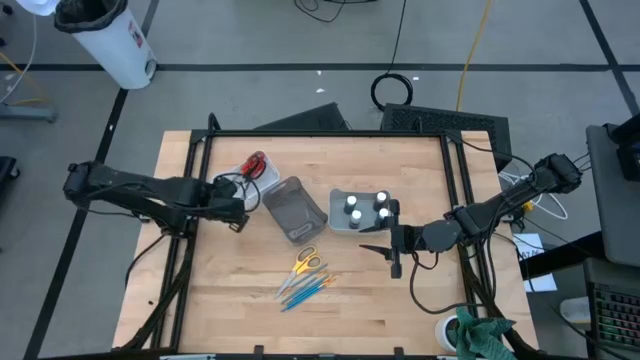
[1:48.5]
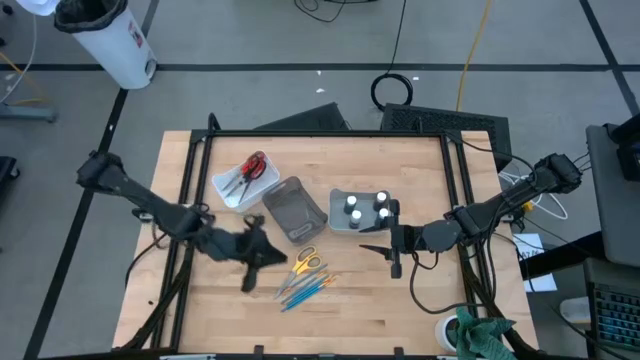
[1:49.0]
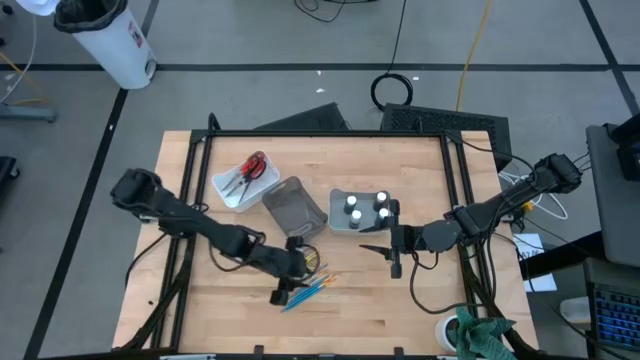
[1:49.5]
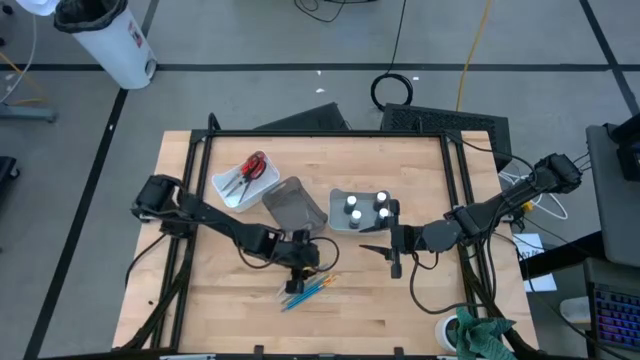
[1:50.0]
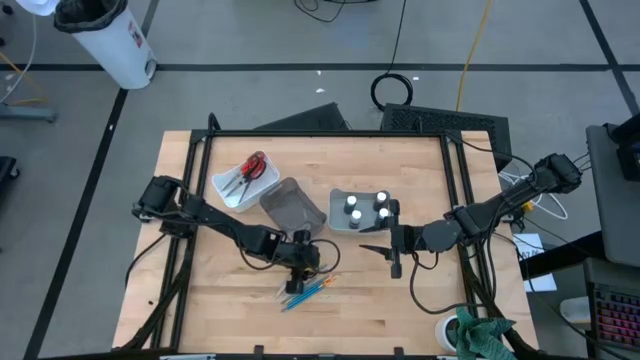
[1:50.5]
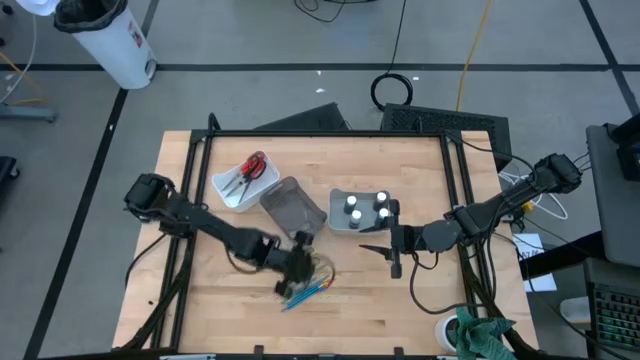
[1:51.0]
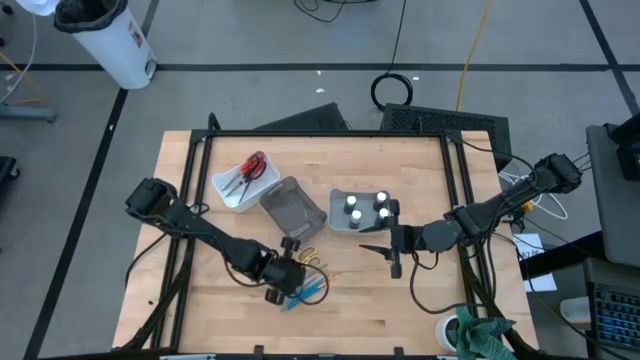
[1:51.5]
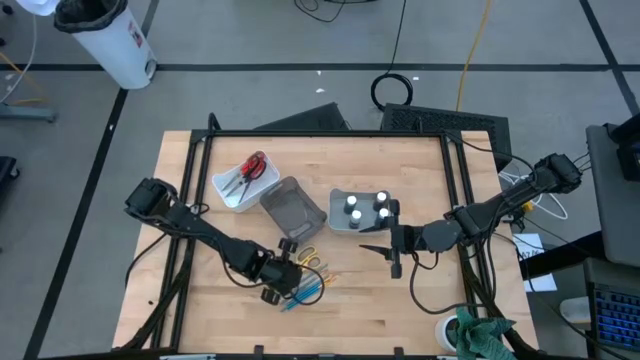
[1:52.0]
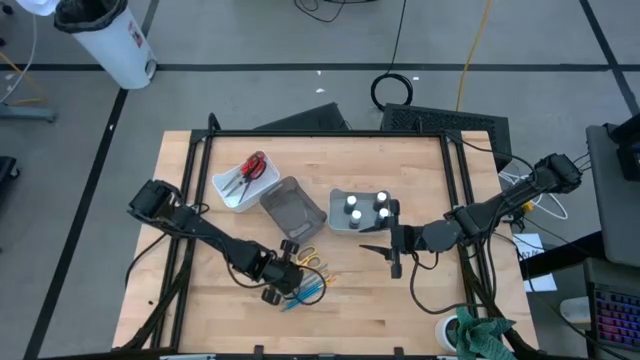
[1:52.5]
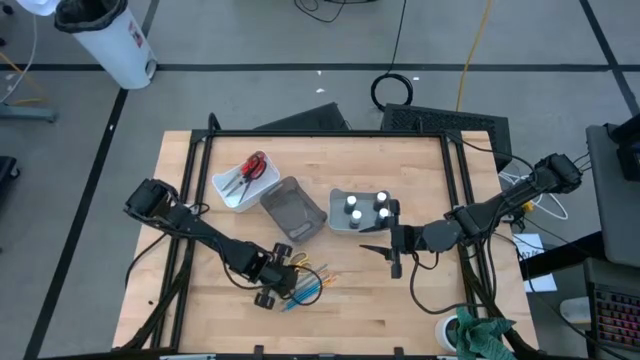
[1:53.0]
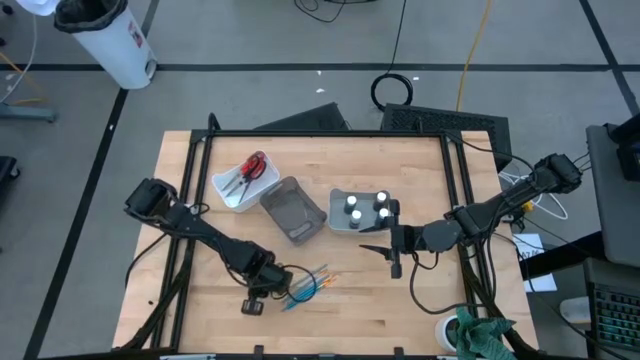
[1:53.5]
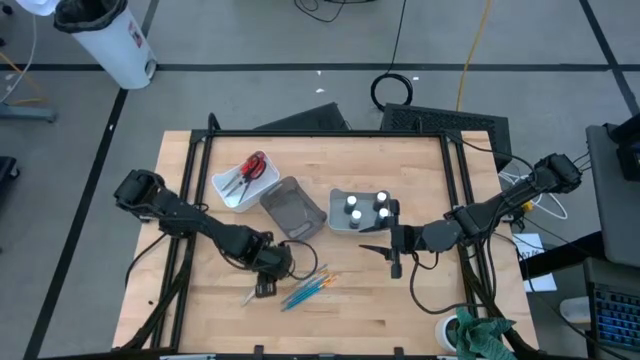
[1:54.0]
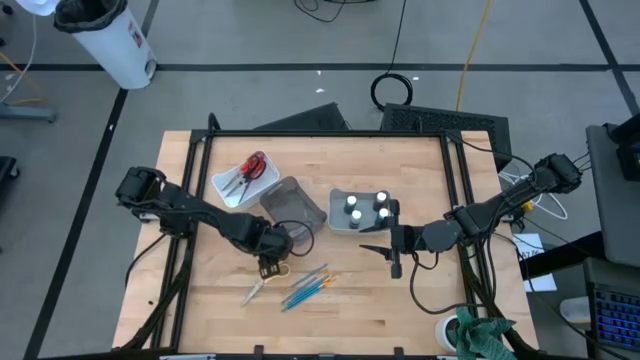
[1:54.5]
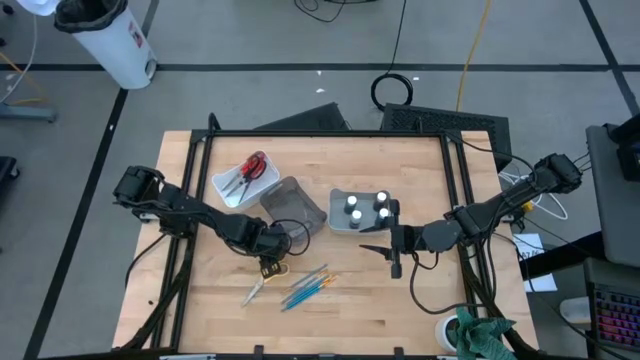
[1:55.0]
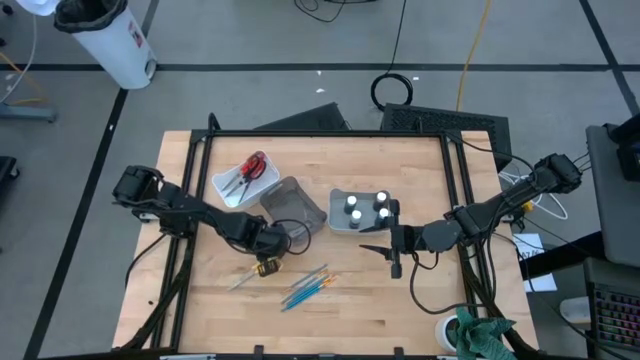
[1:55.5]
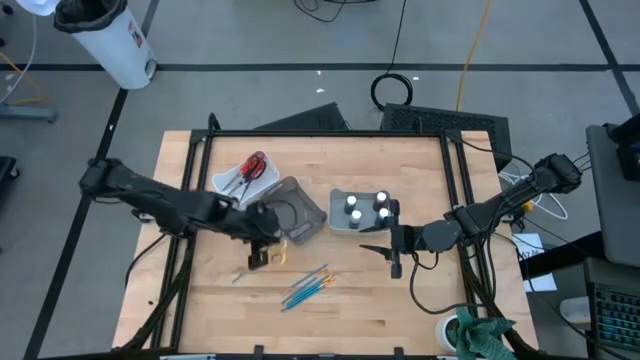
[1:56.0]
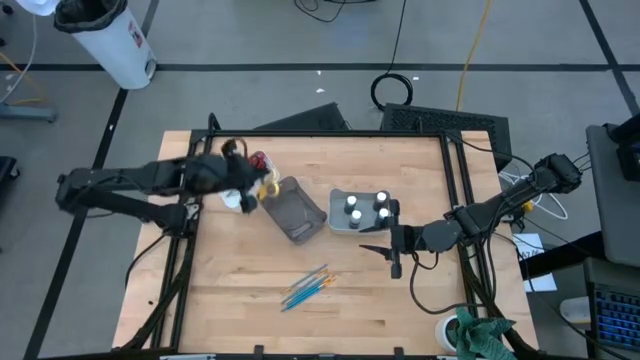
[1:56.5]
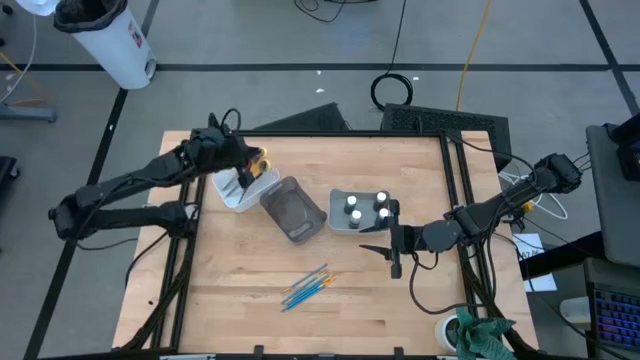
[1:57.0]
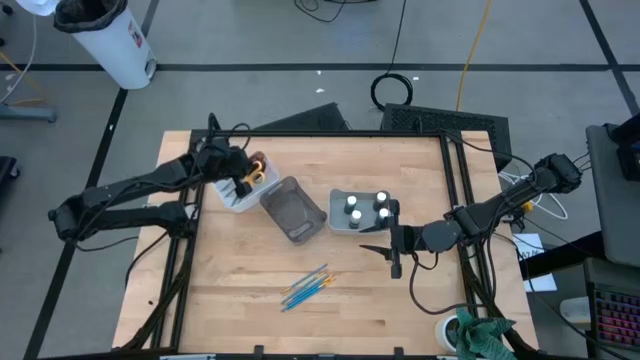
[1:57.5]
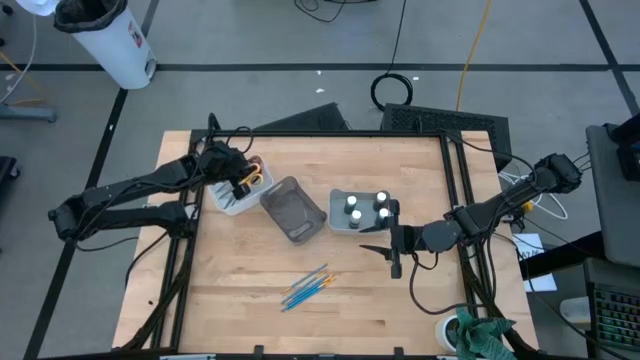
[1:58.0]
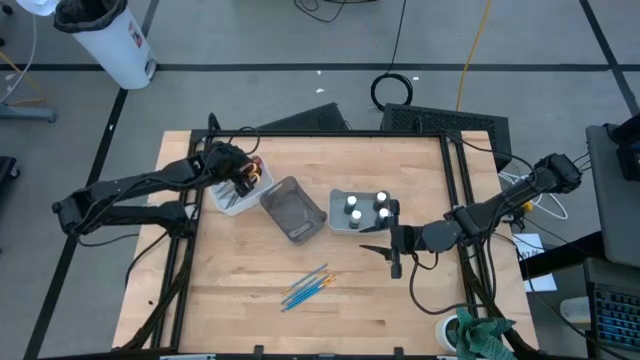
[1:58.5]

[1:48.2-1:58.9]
Task: Pick & Place Paint Supplies
Put the yellow scissors into the white bin

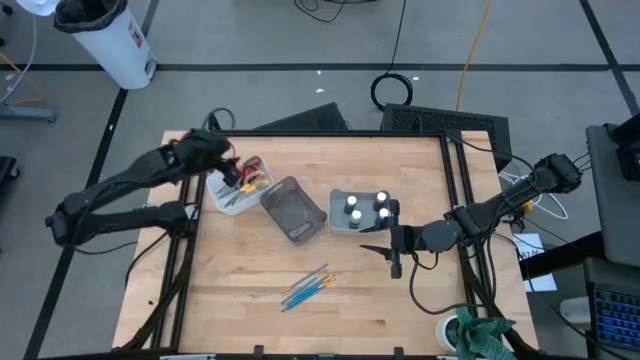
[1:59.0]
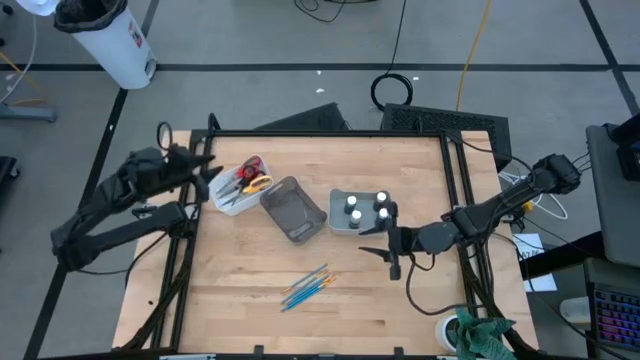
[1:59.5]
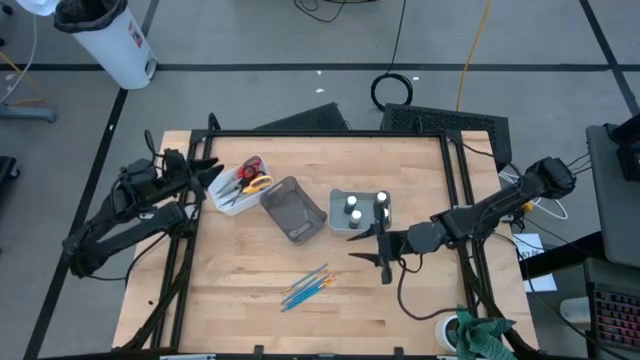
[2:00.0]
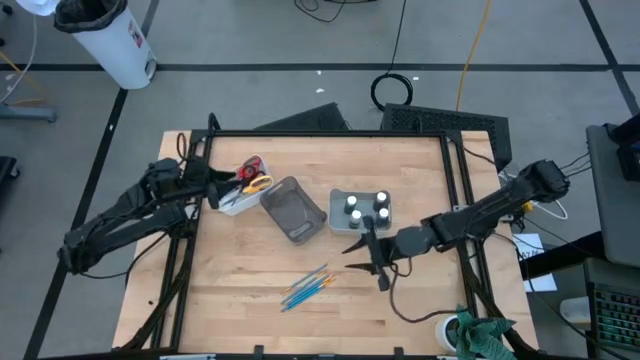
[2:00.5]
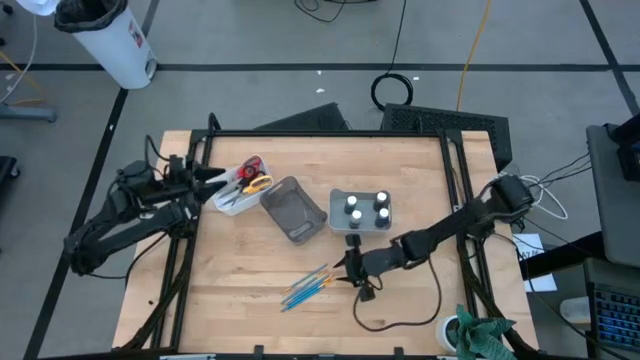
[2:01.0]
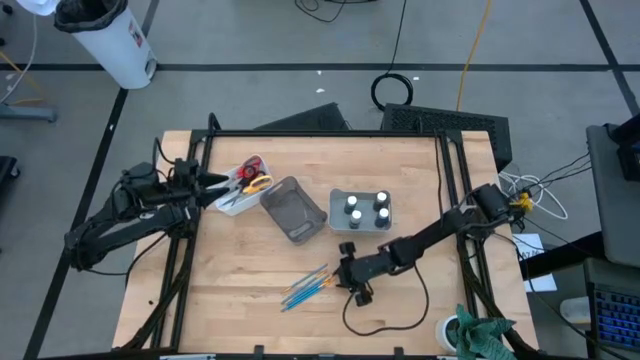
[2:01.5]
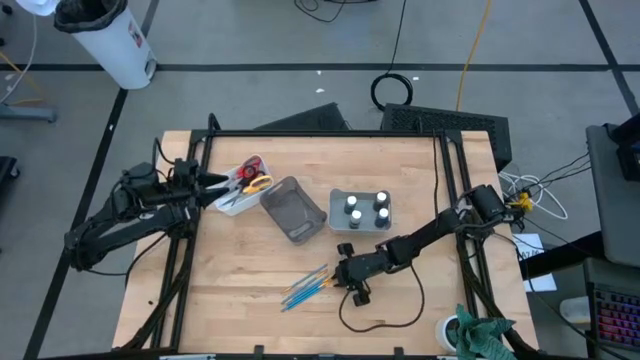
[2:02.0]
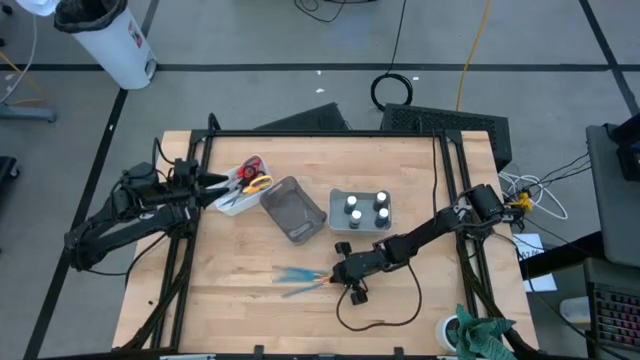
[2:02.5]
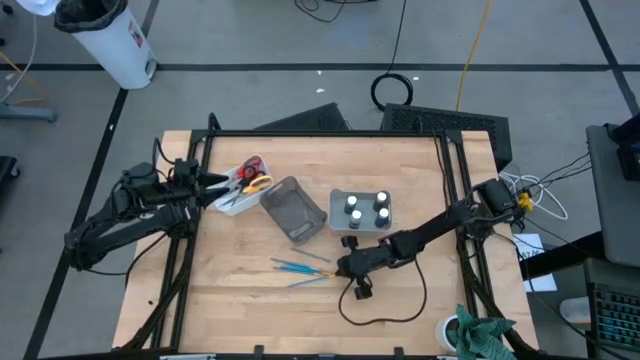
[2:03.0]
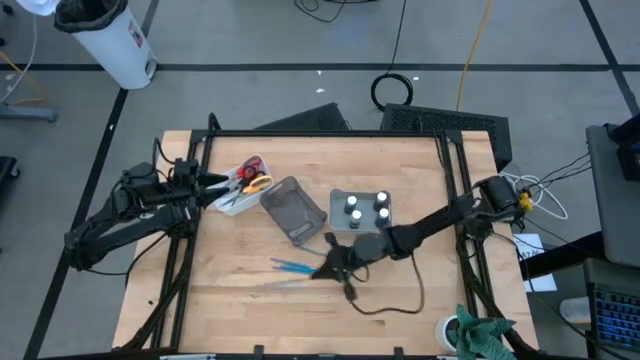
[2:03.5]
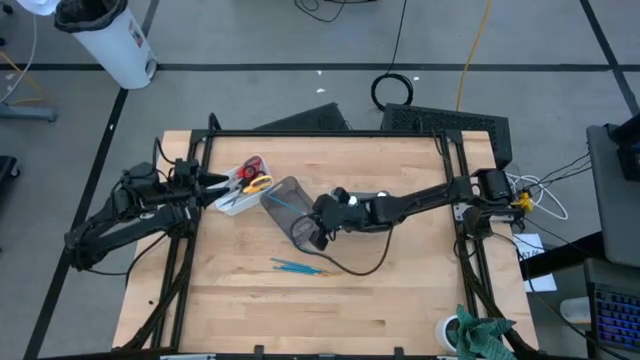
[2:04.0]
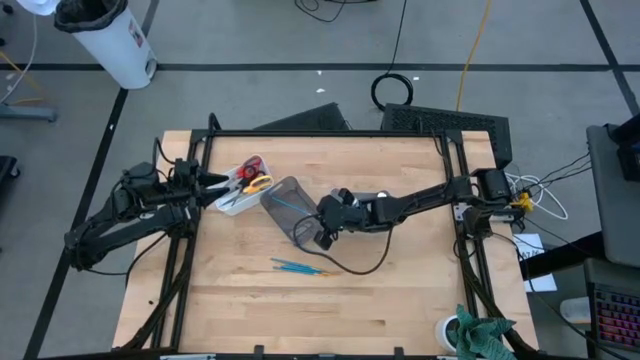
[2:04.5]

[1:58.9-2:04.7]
Put the blue paintbrush into the black bin

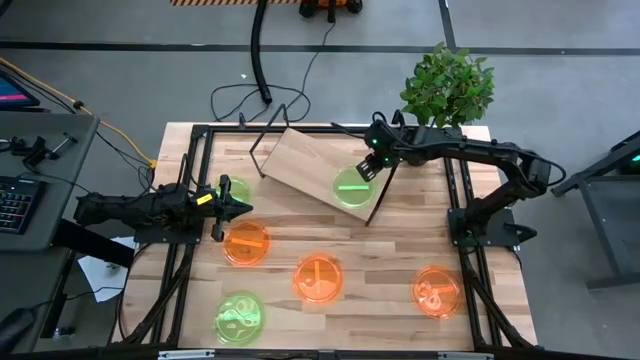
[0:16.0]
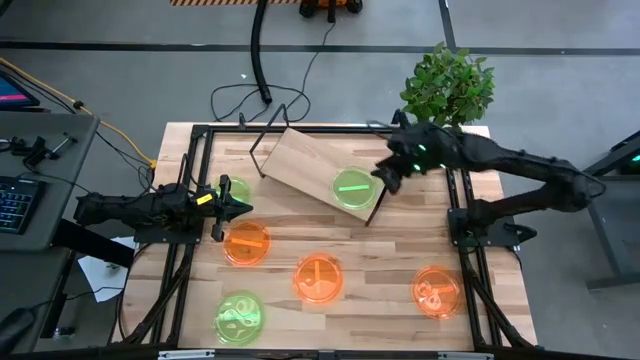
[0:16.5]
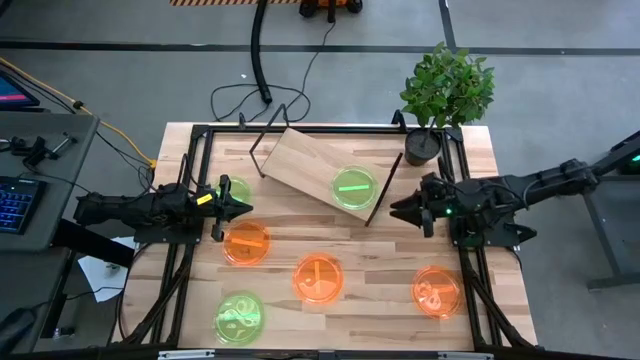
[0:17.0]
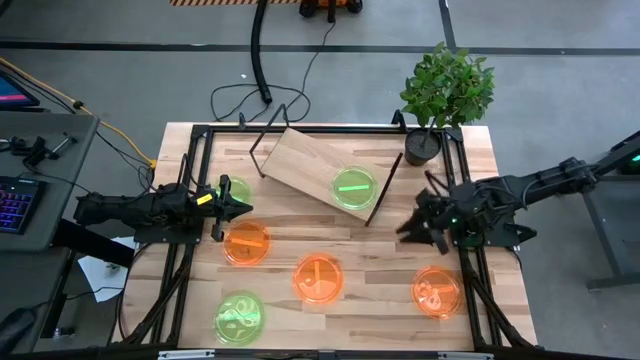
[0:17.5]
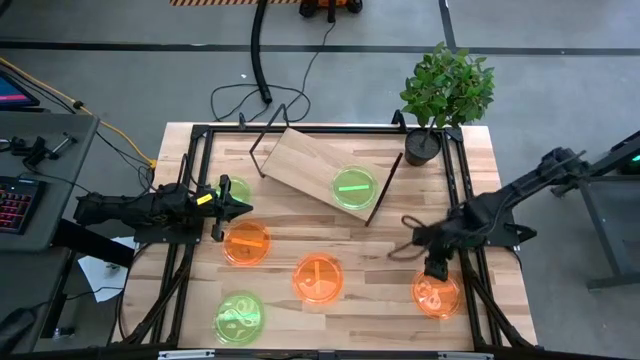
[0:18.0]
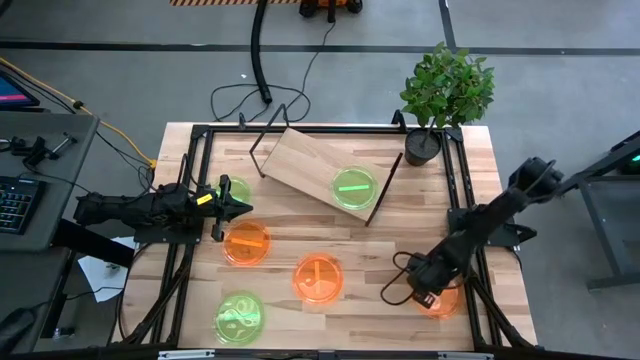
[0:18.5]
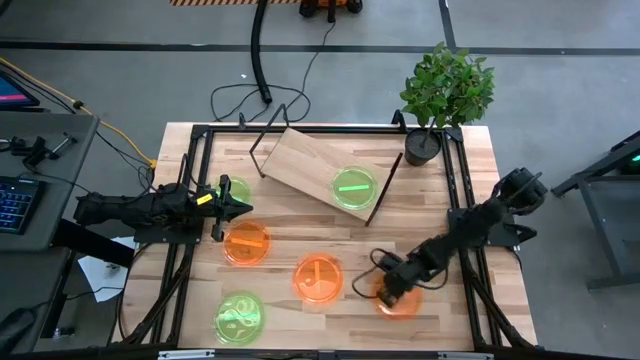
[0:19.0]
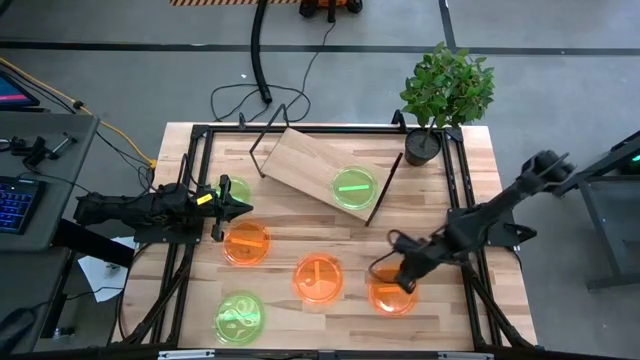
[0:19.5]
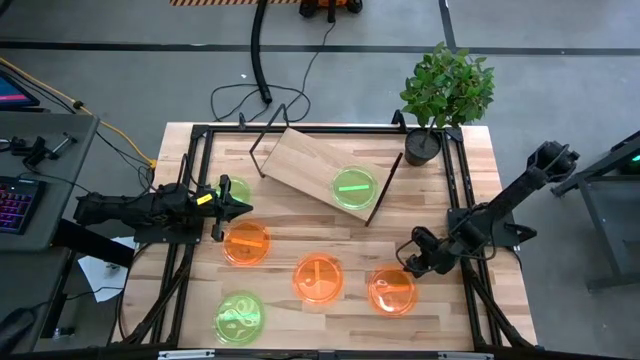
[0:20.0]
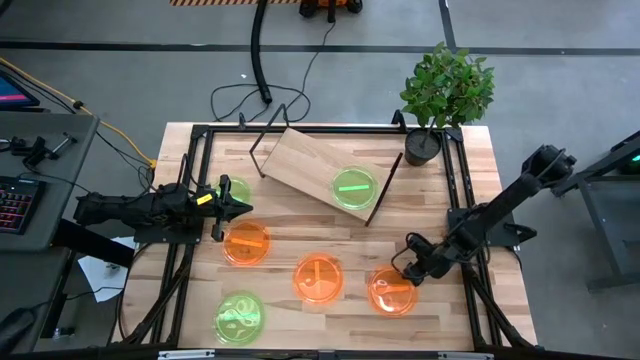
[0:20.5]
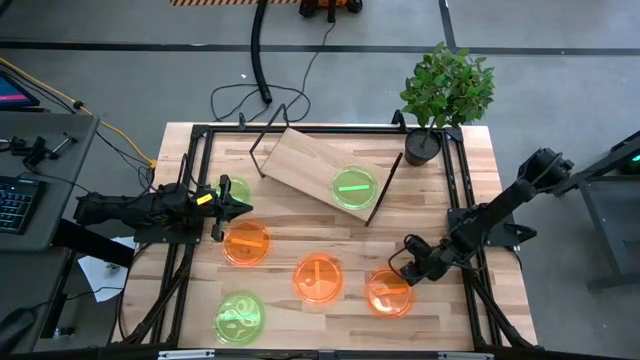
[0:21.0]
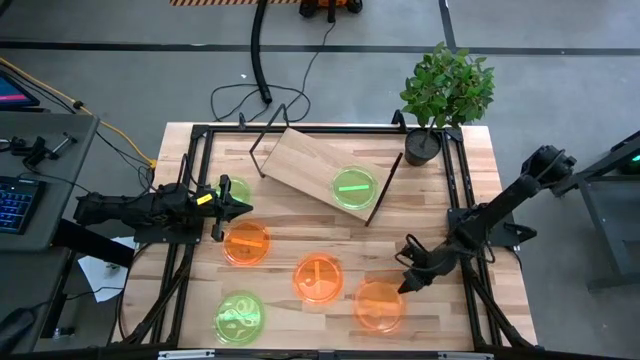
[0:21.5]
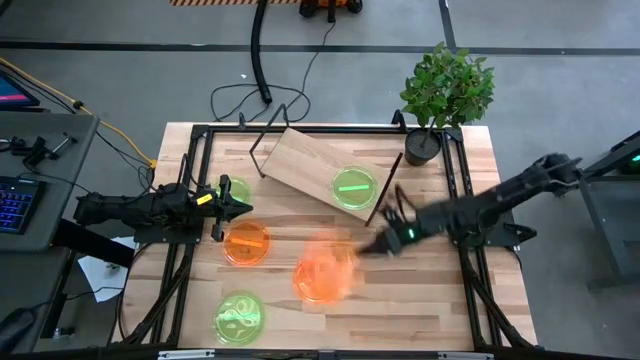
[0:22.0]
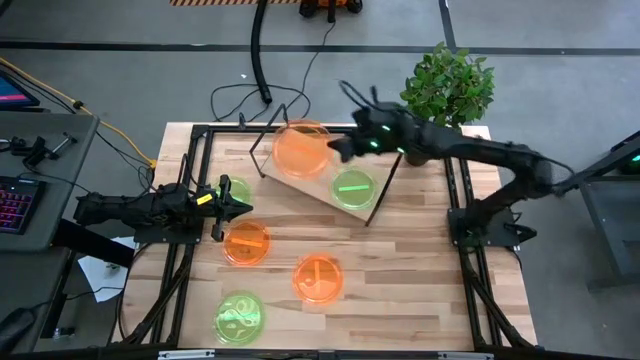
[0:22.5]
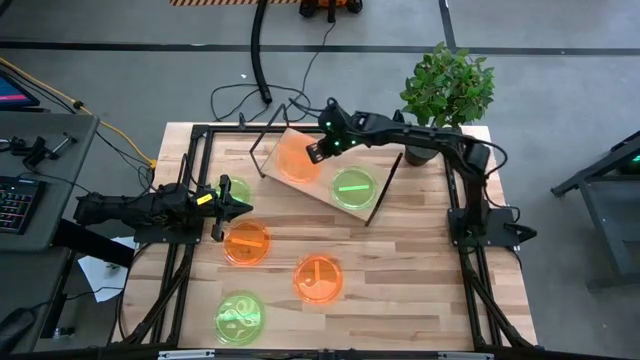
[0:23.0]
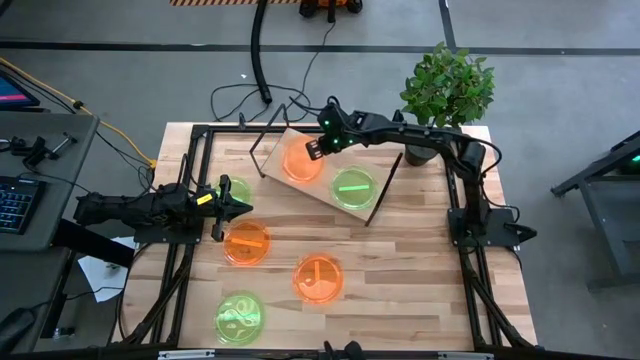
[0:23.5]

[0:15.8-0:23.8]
Task: Place and stack plates onto a shelf
Put the right orange plate on top of the shelf
